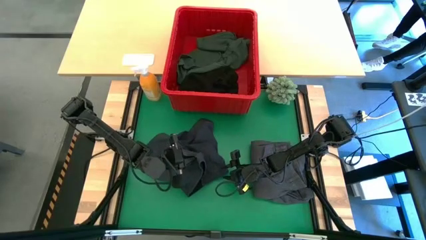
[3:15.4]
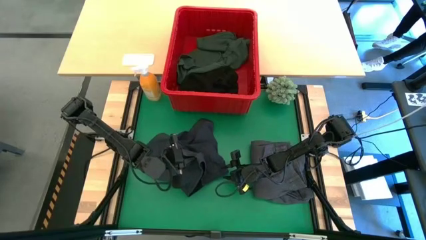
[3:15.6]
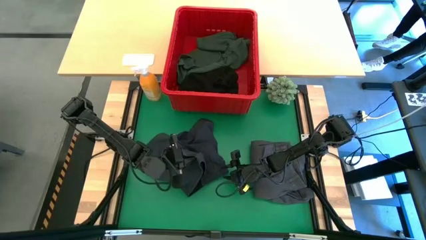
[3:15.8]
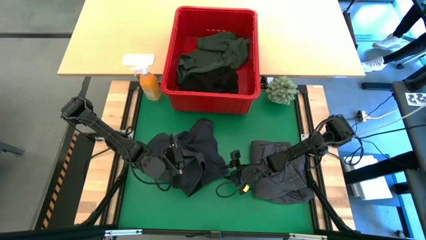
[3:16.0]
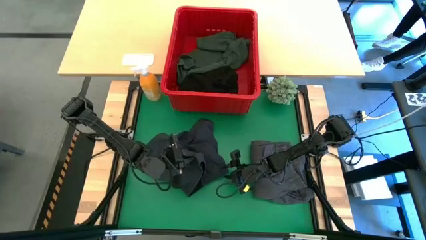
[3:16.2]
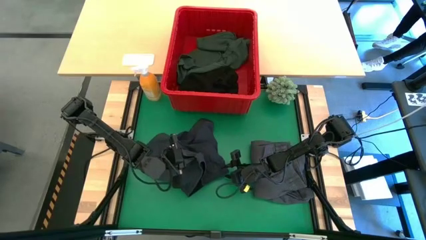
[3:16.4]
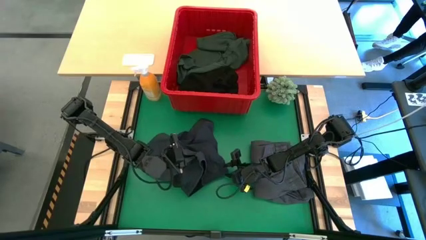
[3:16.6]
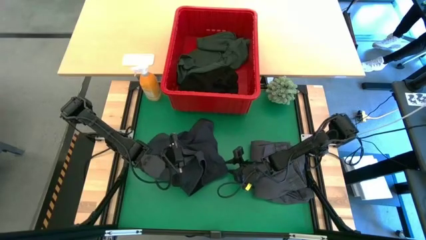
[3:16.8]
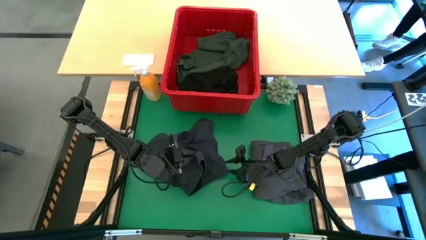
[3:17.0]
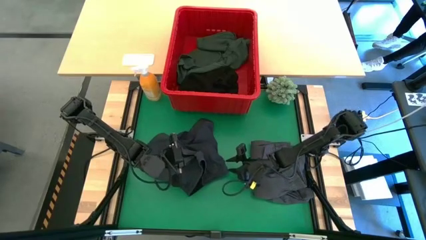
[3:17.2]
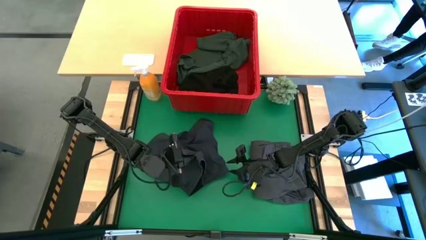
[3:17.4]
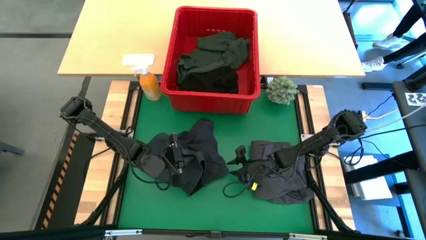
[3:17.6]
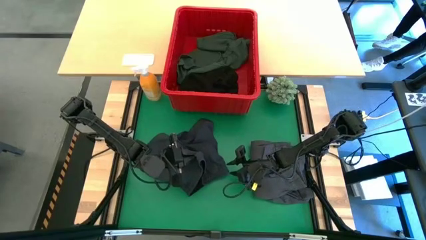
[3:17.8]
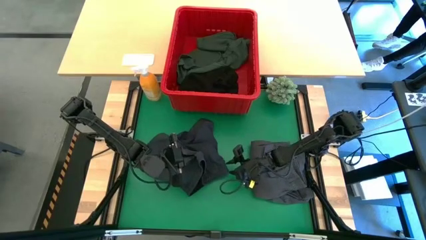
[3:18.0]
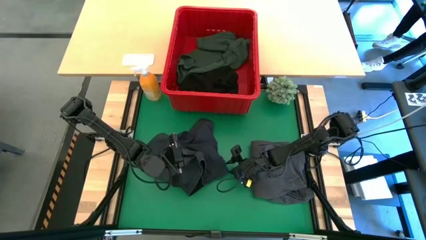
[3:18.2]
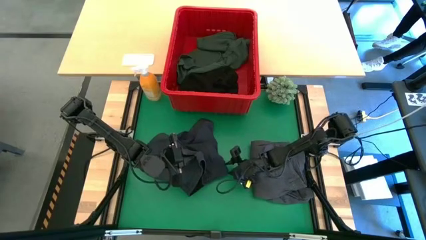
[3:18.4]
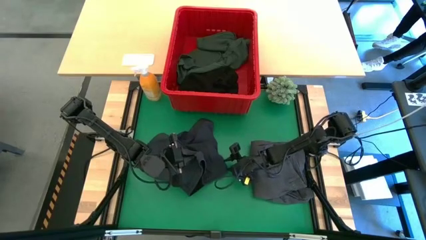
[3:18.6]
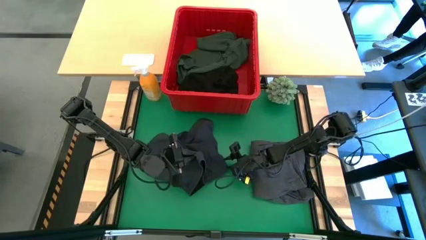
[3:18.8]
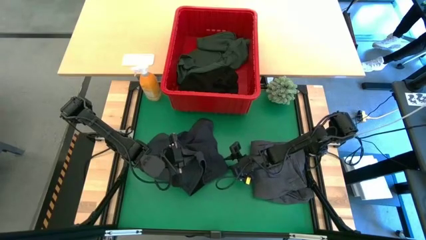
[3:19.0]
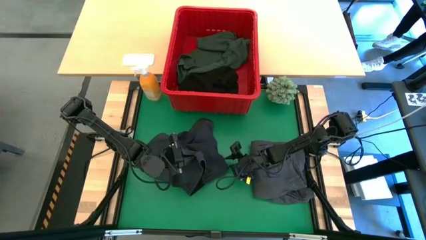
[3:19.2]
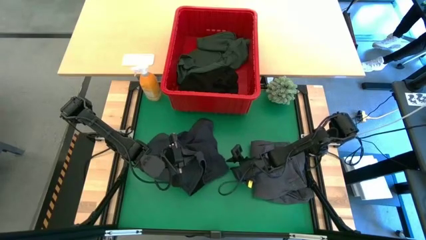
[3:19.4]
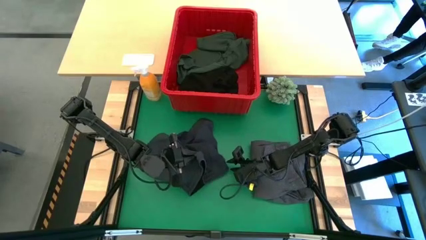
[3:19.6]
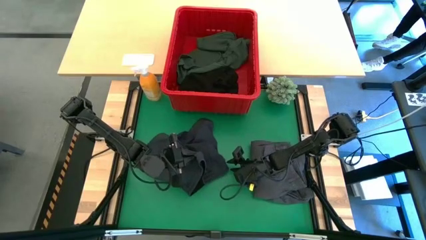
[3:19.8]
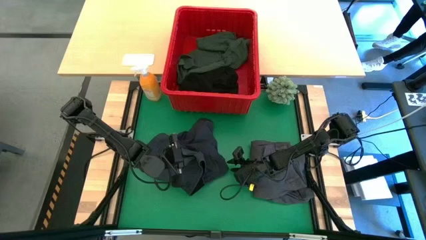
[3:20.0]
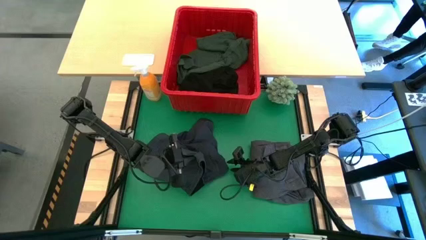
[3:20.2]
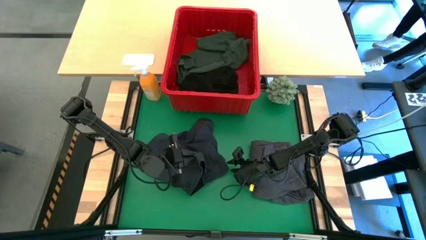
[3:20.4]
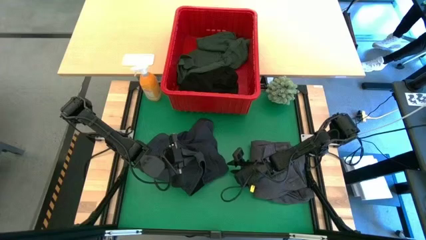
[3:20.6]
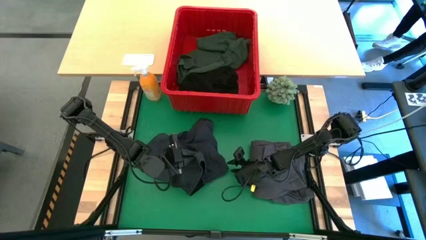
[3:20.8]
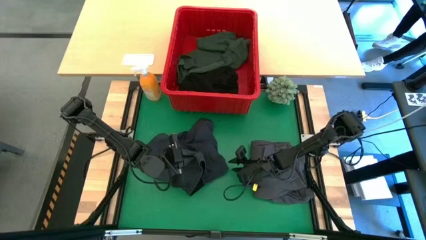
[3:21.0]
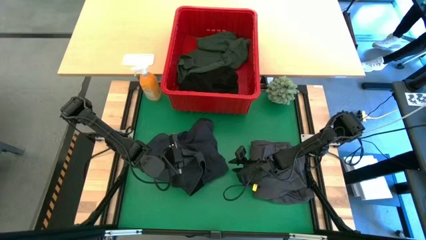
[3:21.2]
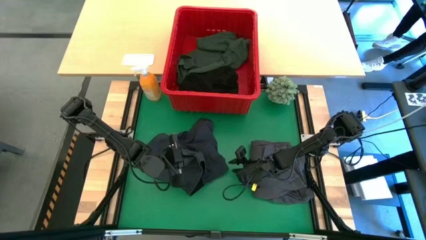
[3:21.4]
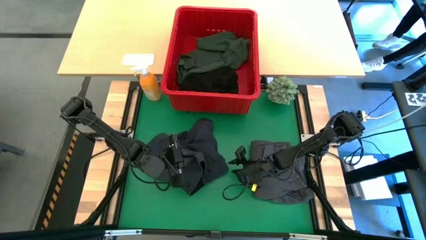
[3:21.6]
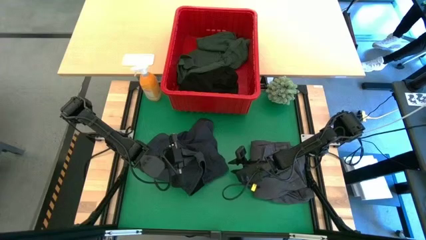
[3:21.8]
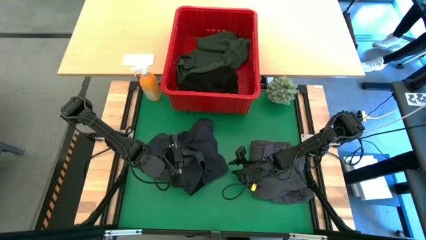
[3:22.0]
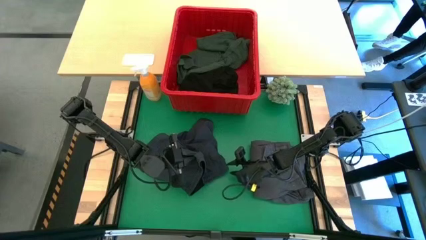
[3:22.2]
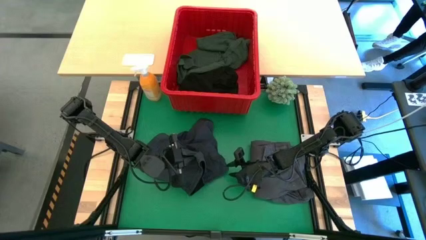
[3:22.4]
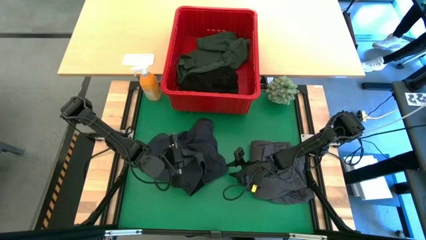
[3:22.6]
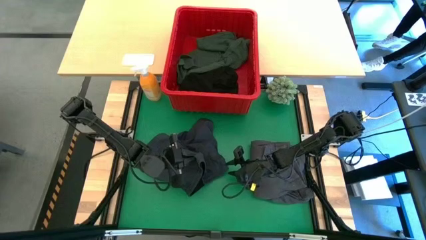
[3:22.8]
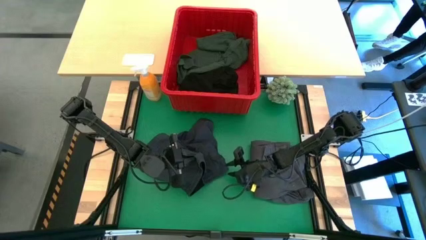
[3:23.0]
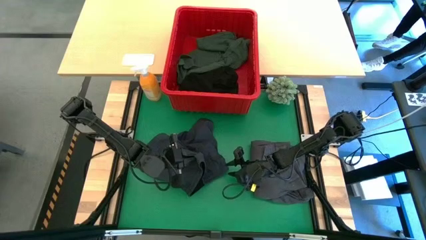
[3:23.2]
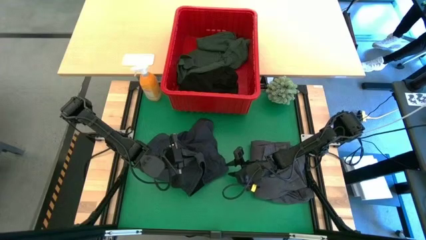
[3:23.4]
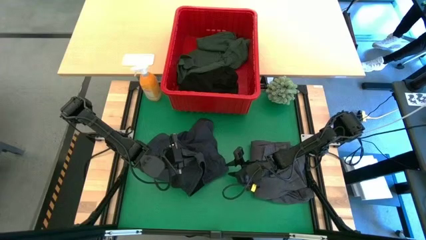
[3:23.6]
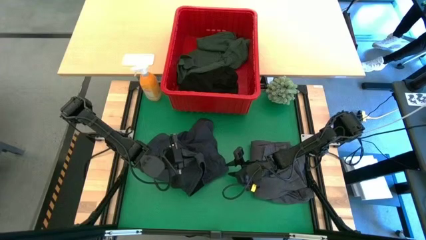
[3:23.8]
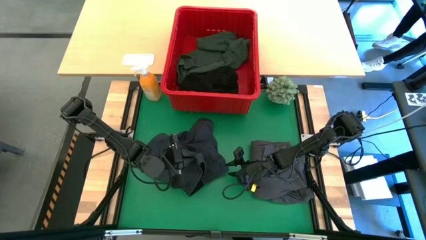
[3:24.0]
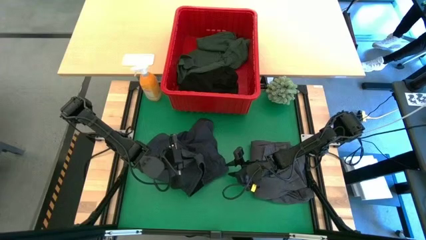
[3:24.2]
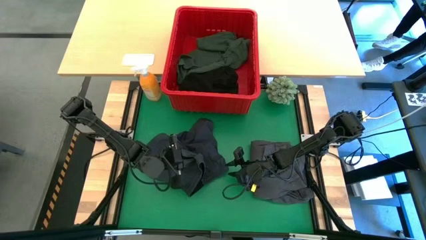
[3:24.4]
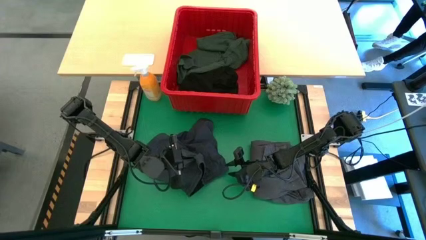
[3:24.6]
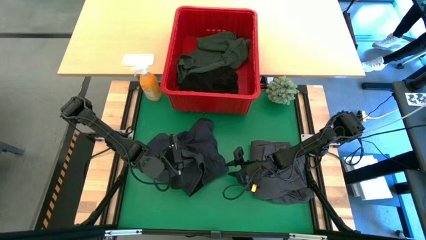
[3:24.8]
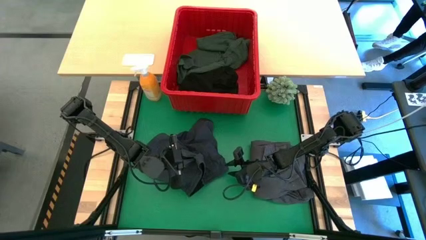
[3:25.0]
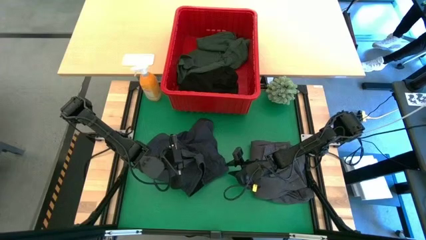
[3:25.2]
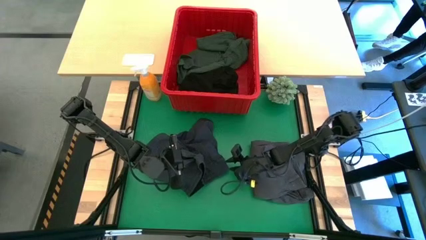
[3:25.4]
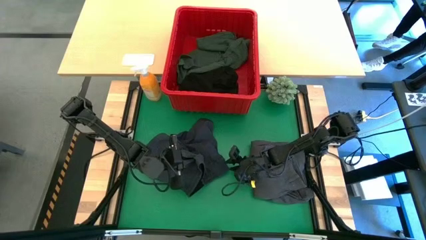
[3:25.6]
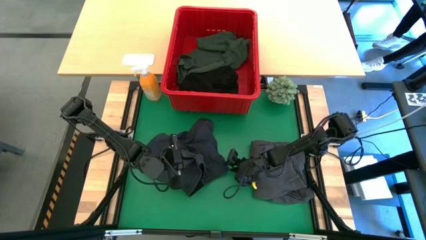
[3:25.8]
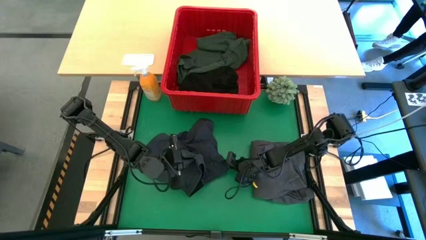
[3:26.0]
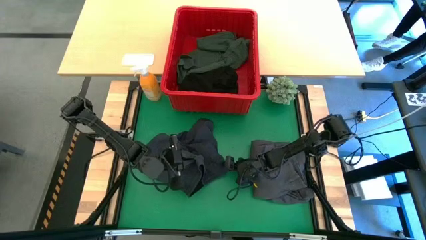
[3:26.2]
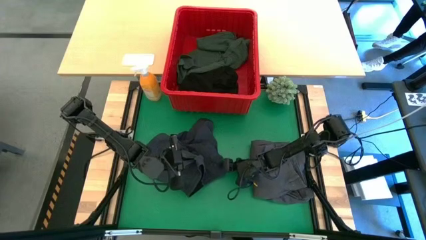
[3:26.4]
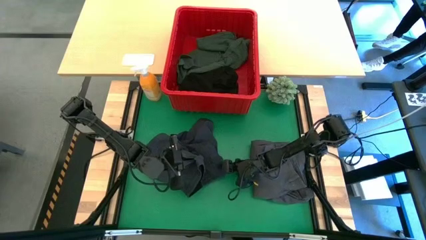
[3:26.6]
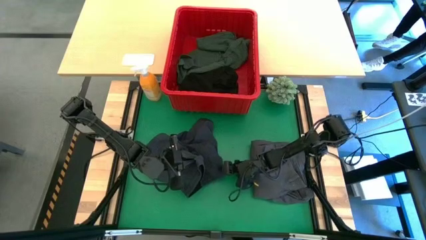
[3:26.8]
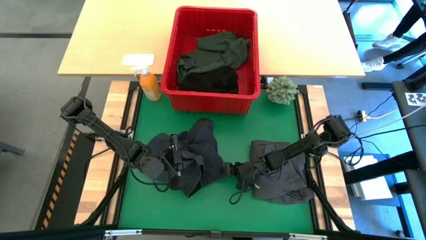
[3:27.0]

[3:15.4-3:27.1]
Task: Fold Laundry from Bin
Fold the dark gray short

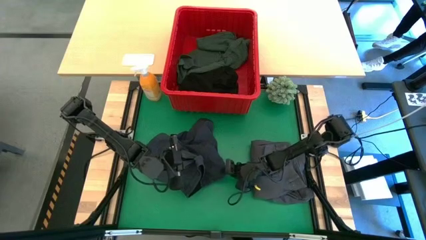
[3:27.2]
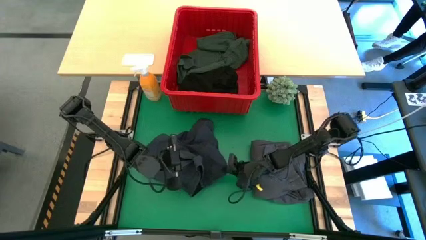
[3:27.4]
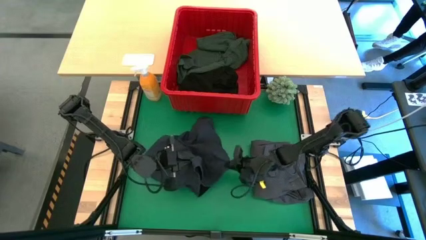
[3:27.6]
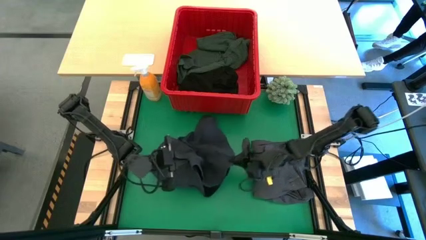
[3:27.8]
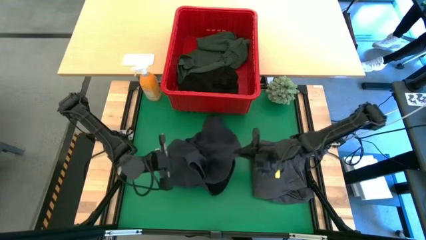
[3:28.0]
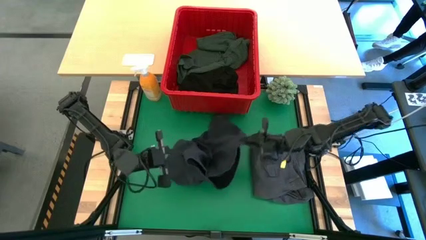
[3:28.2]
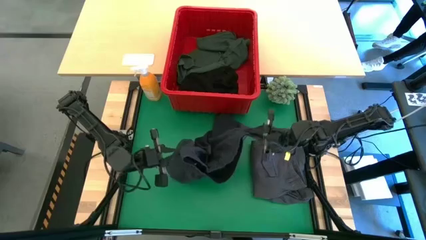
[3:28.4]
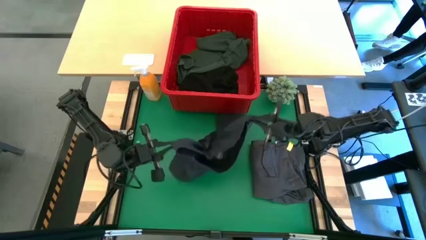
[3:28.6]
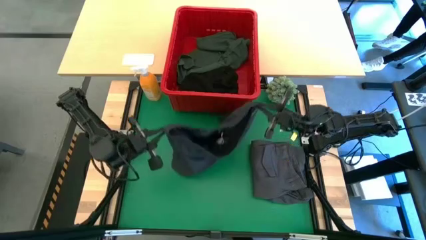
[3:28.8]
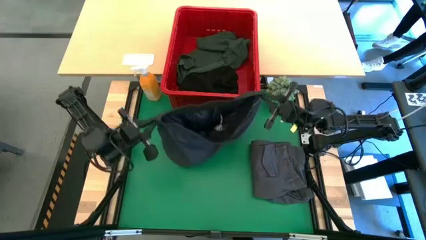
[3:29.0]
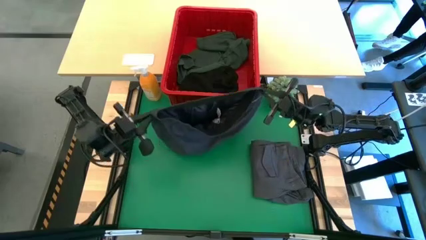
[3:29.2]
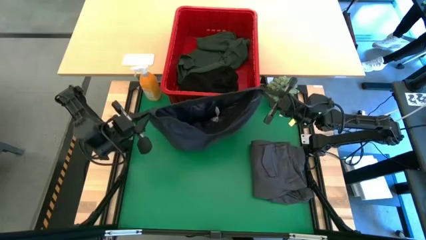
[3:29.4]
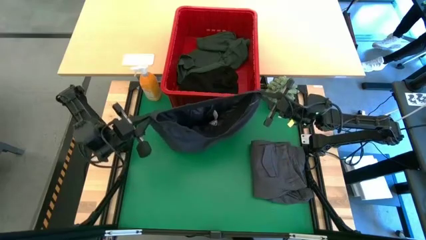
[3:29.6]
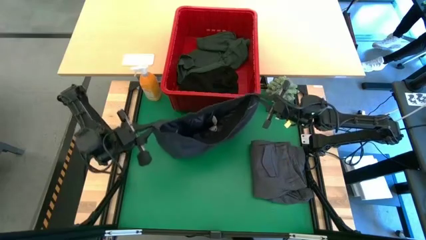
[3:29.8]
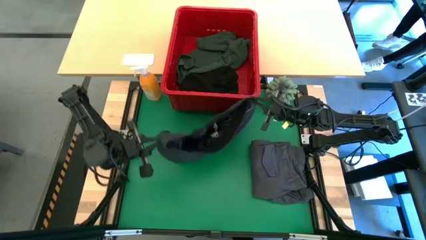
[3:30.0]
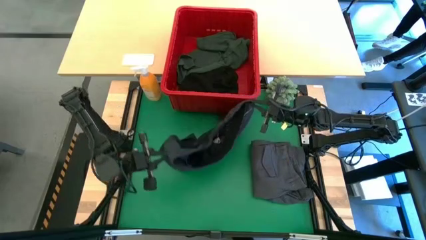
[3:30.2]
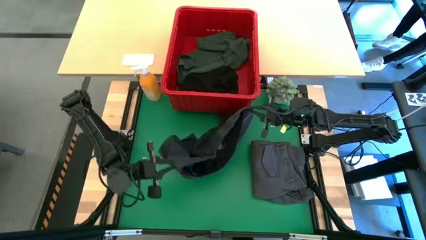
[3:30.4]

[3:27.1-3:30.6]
Fold the dark gray short

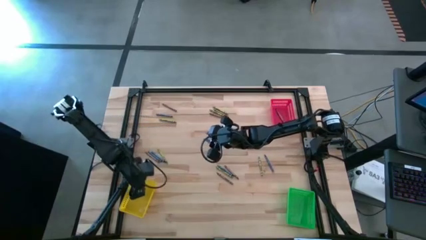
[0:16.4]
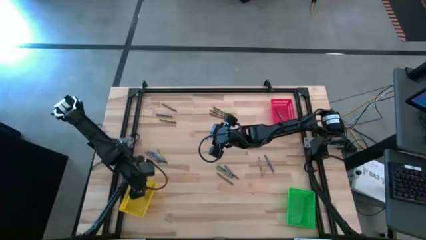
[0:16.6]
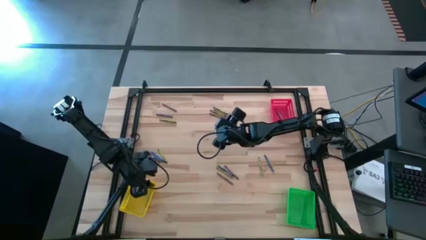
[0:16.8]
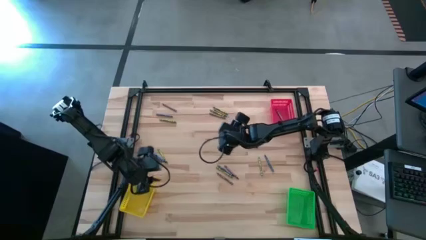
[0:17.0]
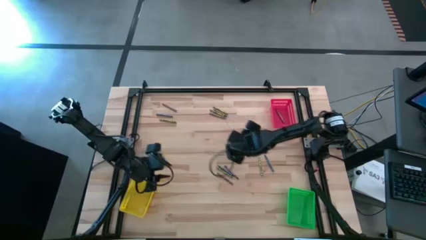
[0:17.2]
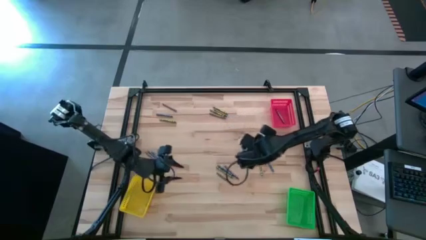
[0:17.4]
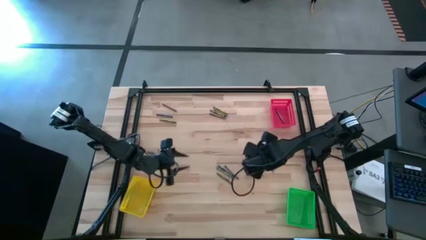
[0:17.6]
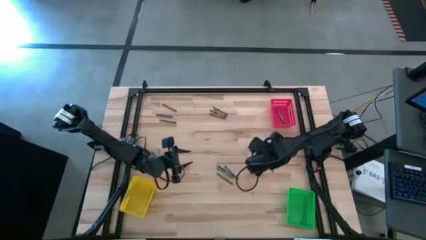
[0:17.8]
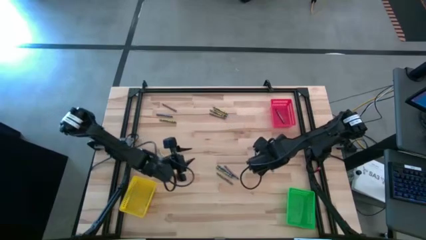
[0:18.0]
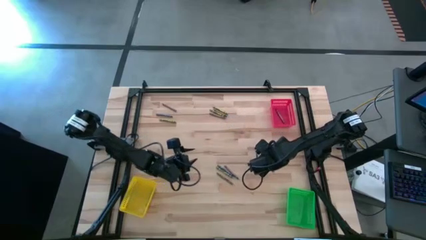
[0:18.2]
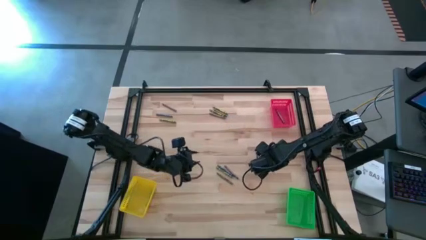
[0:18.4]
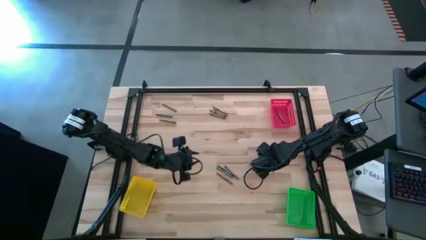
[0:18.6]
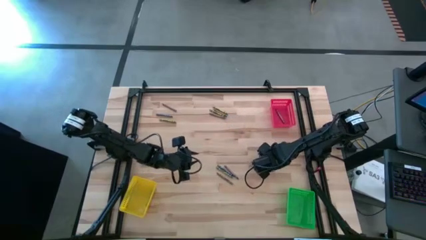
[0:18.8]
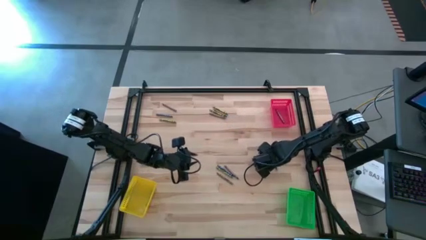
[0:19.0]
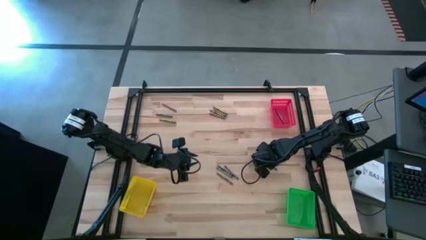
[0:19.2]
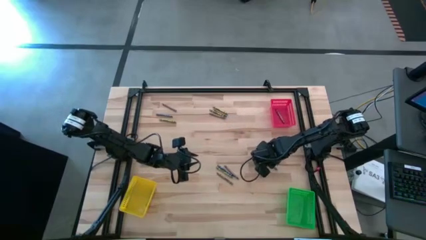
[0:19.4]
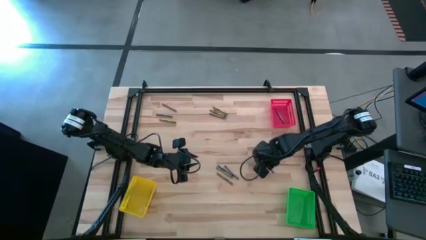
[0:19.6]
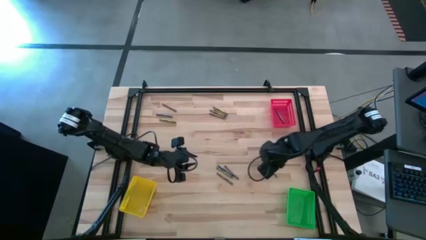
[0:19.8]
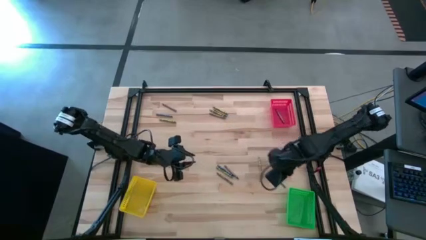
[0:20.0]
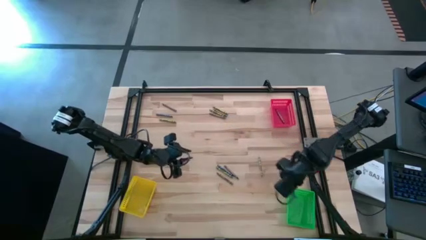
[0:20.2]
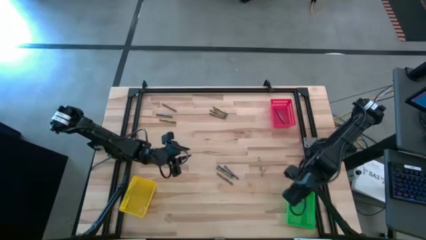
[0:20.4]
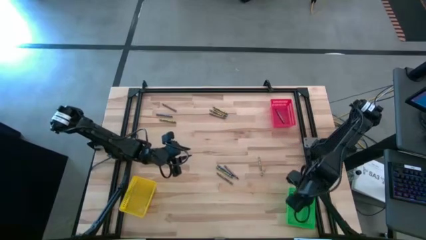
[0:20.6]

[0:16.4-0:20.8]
Task: Sort crayons
Put the blue crayon into the green bin
